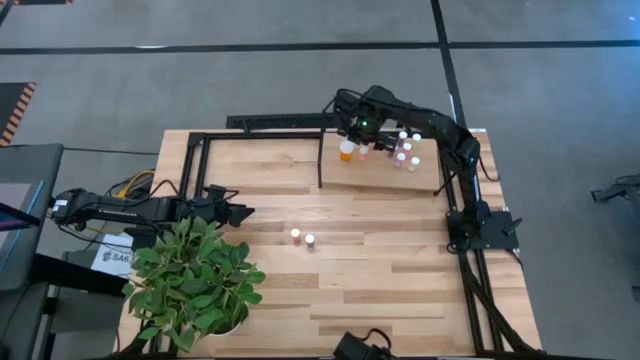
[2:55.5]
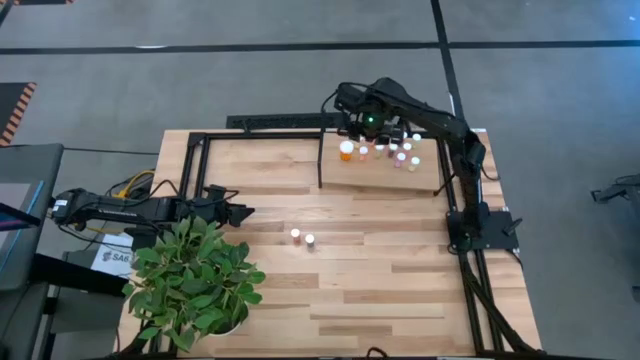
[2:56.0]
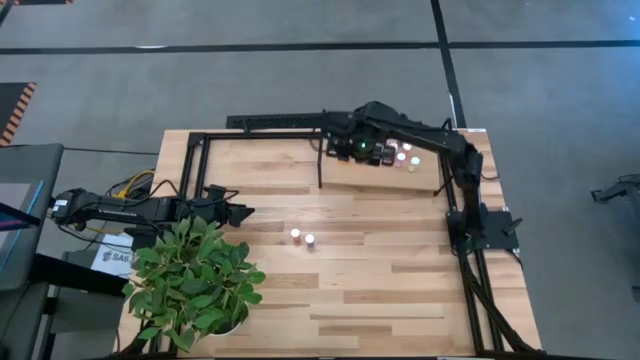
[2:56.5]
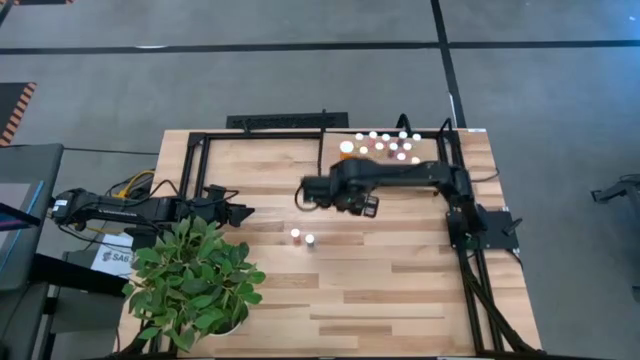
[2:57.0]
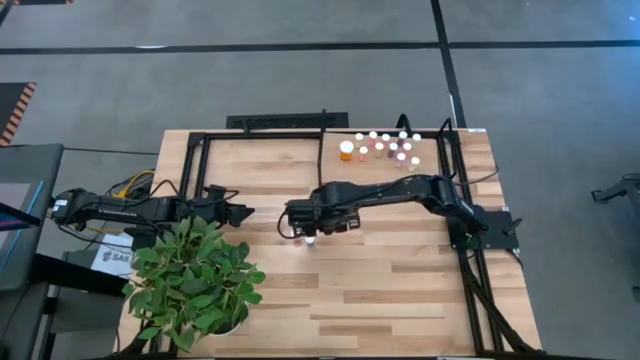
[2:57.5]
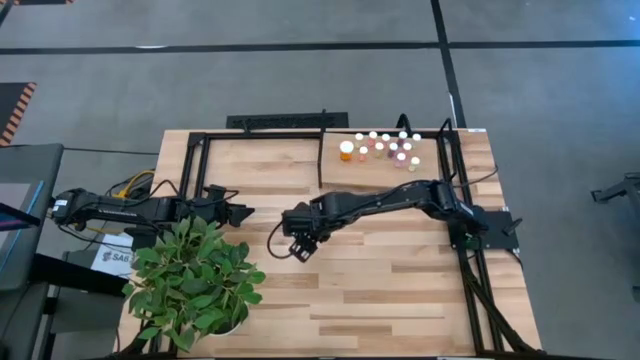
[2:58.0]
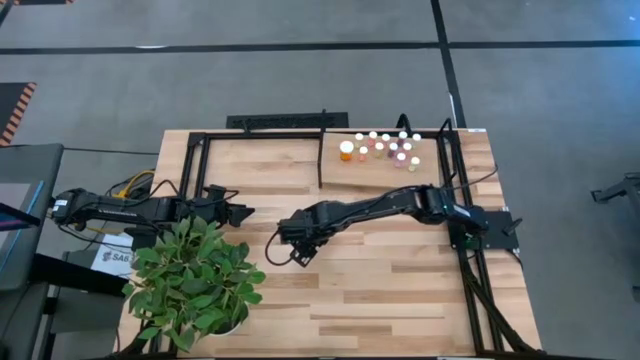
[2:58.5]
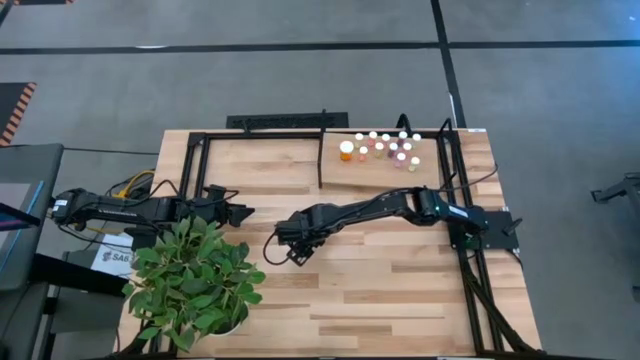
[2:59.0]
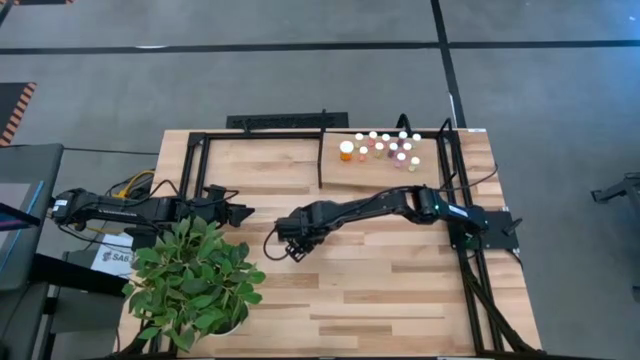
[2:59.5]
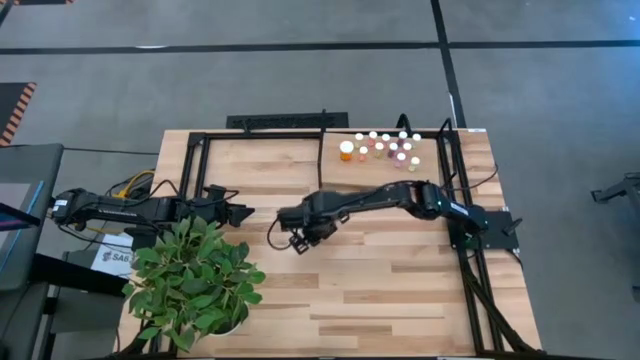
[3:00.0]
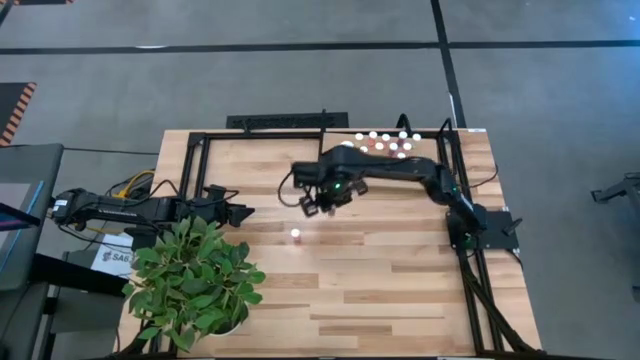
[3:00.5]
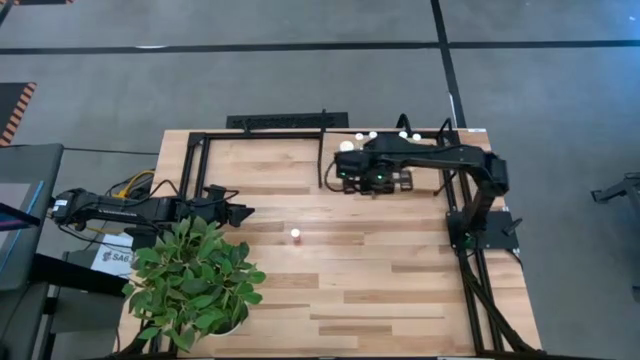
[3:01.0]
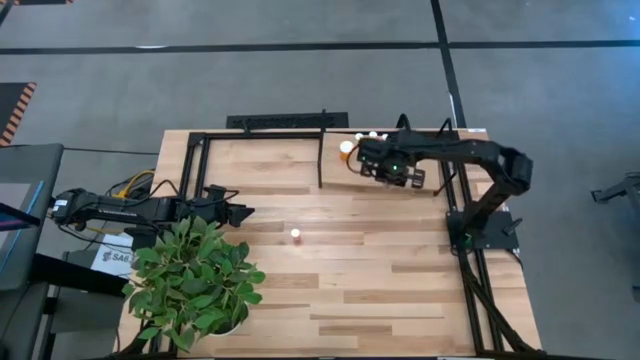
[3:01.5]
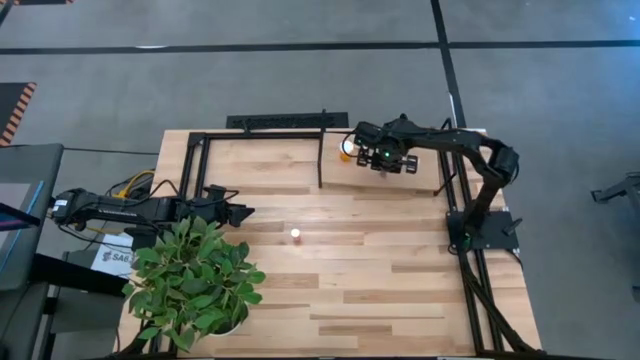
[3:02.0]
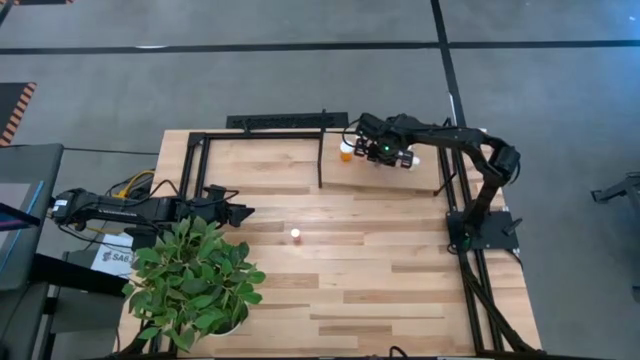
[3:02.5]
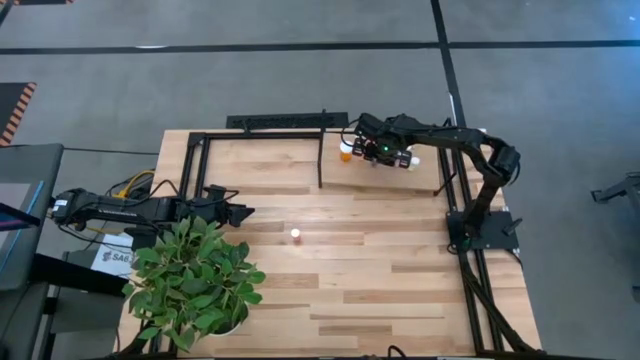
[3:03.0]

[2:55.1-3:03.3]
Task: Pick and place medicine bottles onto shelf by color
Put the blue pill bottle on the shelf

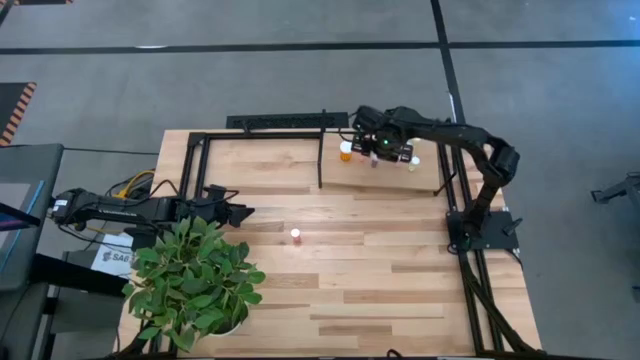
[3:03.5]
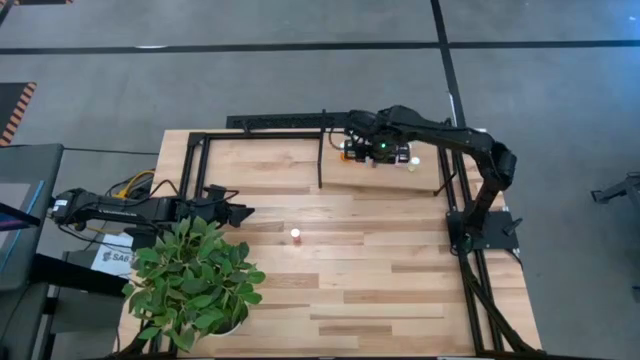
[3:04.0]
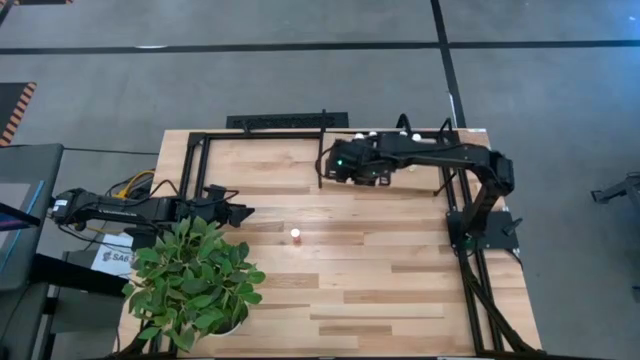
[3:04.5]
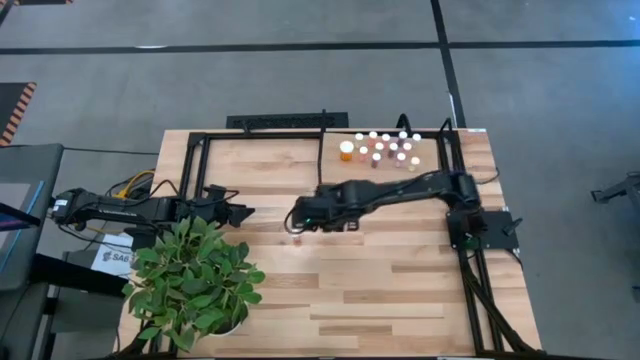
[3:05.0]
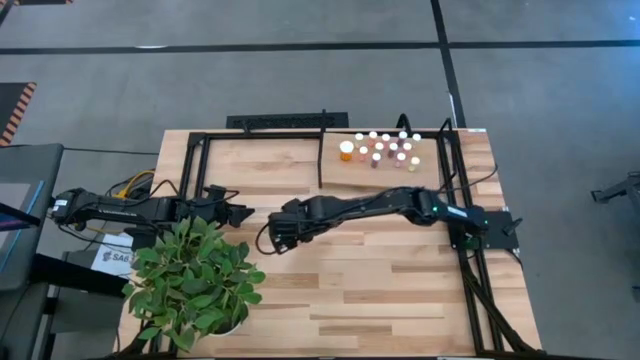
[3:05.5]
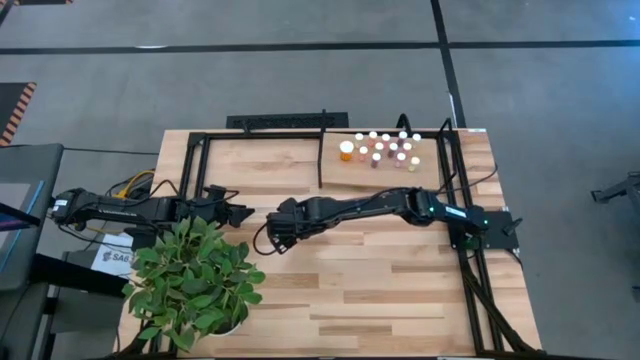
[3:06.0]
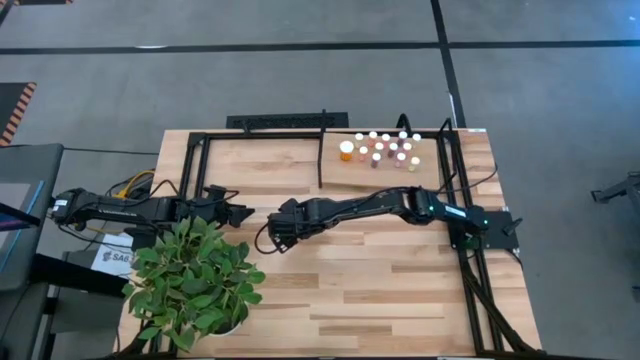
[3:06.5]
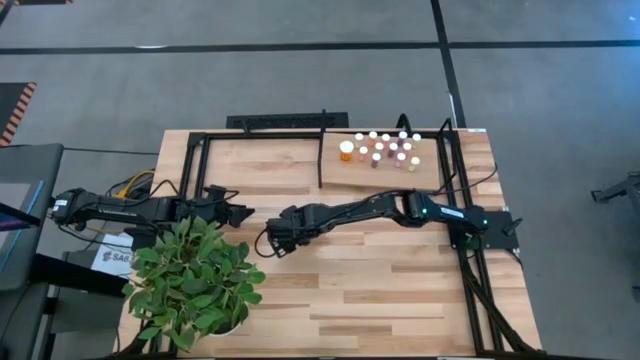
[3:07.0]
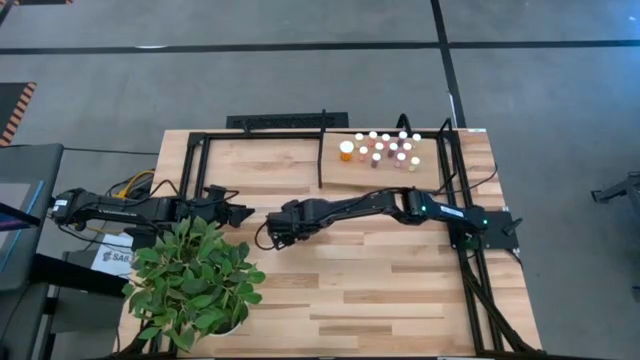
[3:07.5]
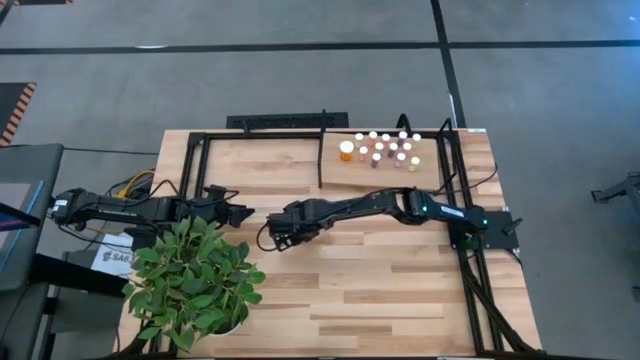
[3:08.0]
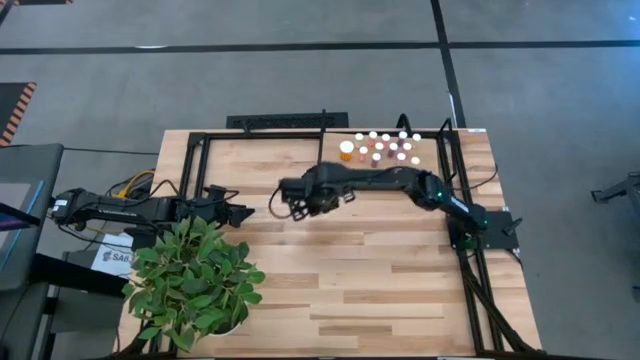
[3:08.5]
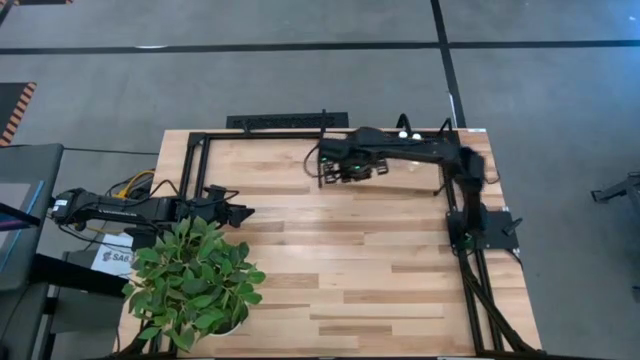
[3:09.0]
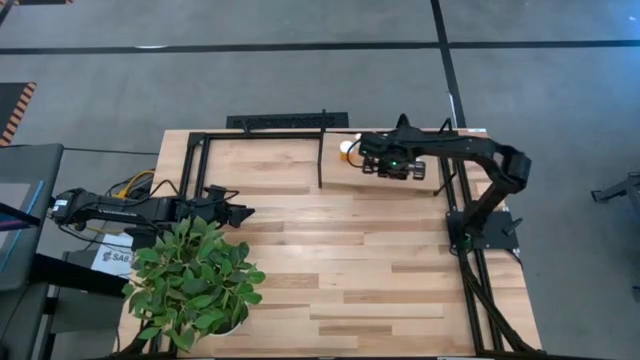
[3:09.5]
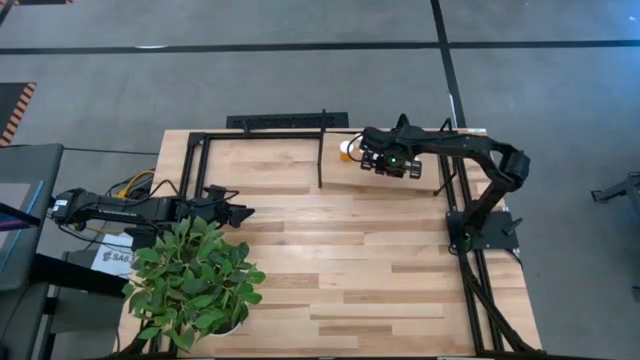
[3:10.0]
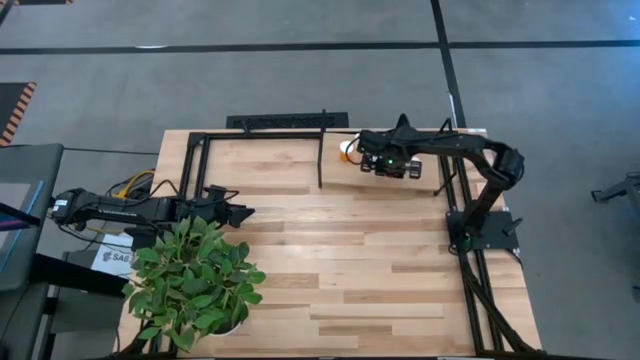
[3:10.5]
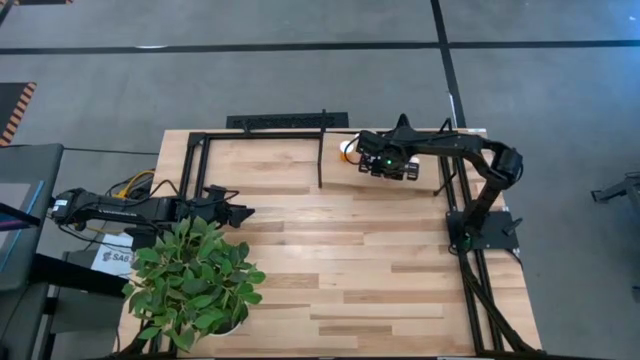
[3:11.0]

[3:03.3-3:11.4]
Put the pink pill bottle on the shelf

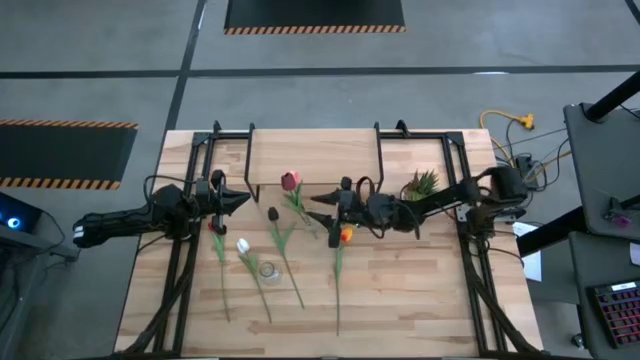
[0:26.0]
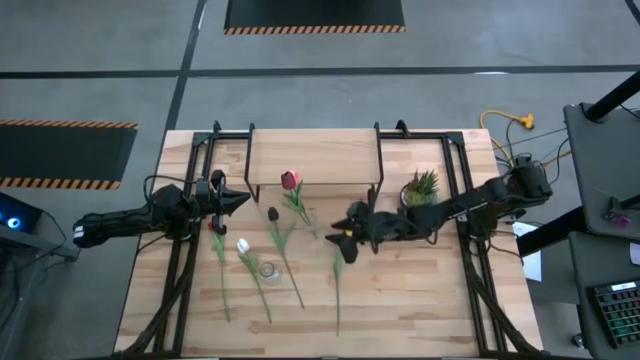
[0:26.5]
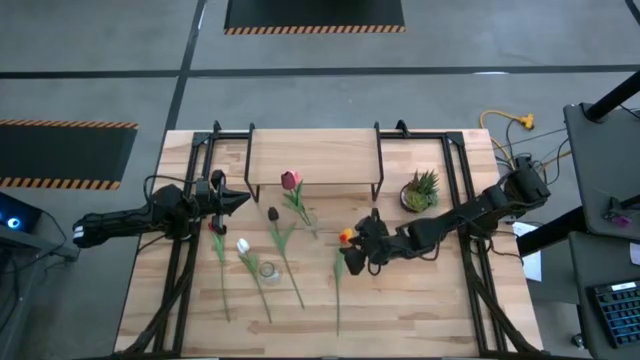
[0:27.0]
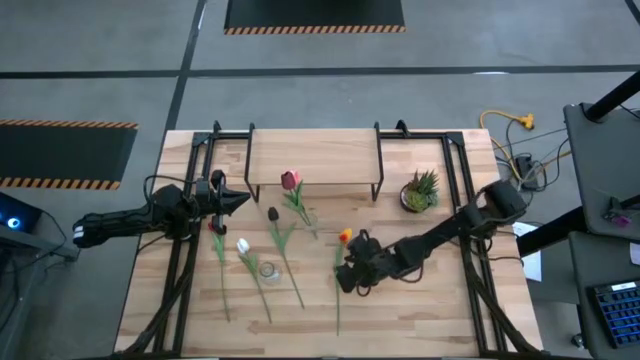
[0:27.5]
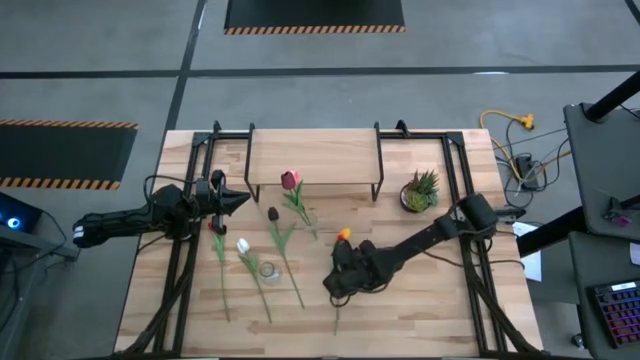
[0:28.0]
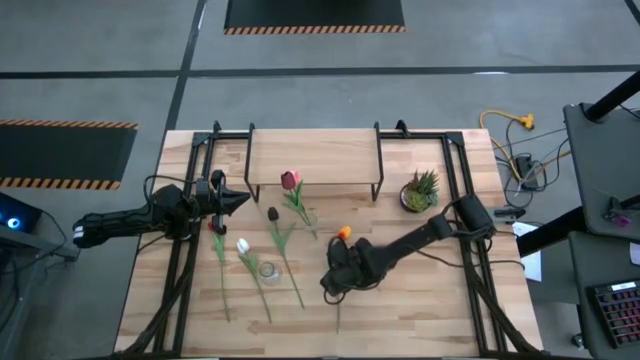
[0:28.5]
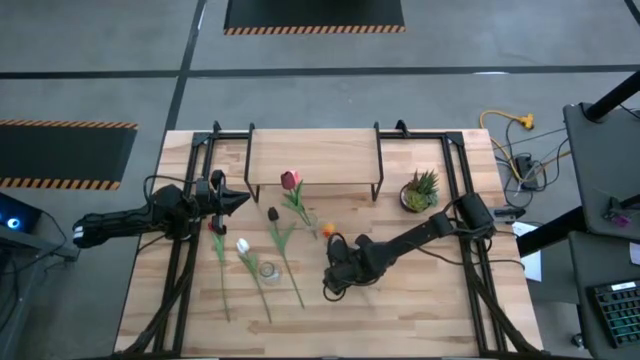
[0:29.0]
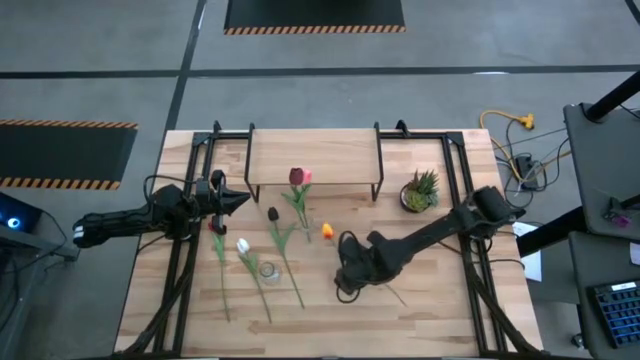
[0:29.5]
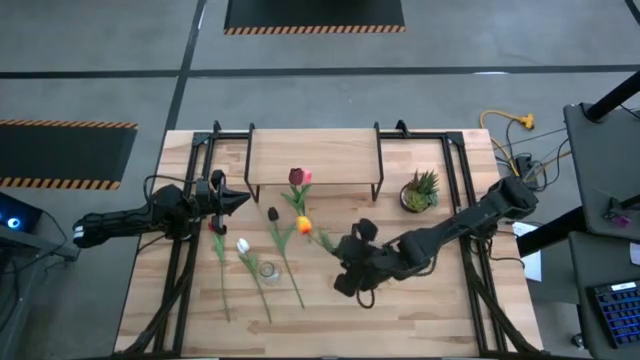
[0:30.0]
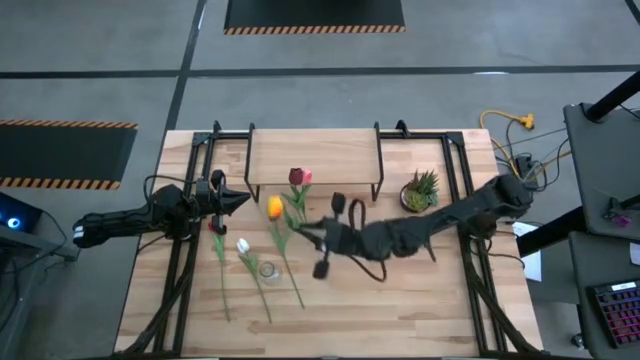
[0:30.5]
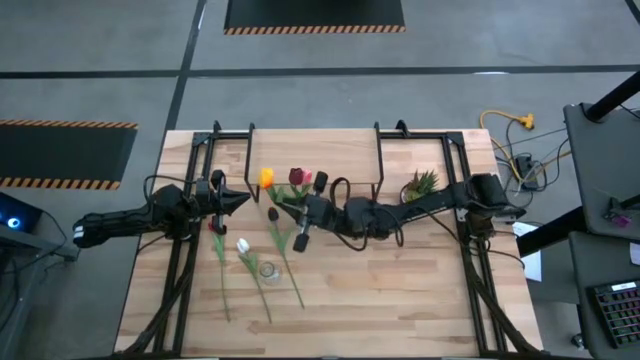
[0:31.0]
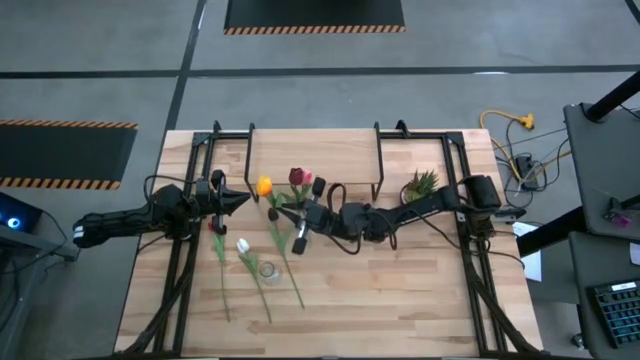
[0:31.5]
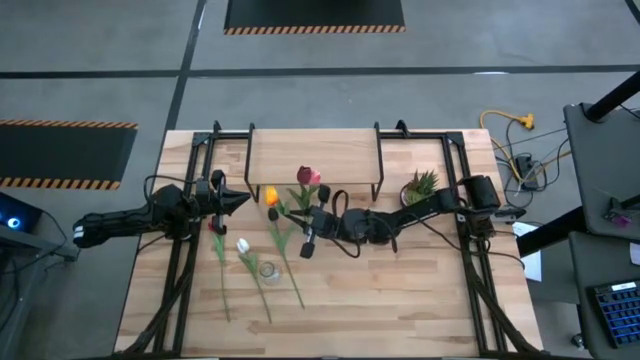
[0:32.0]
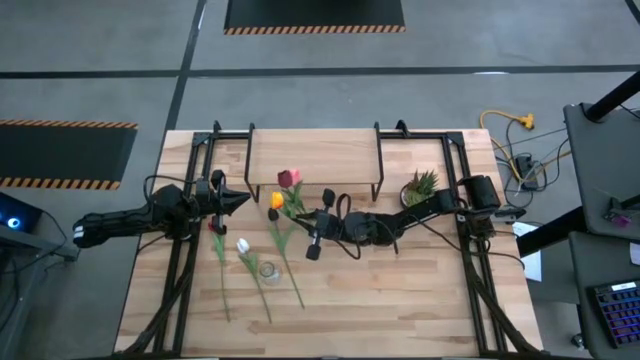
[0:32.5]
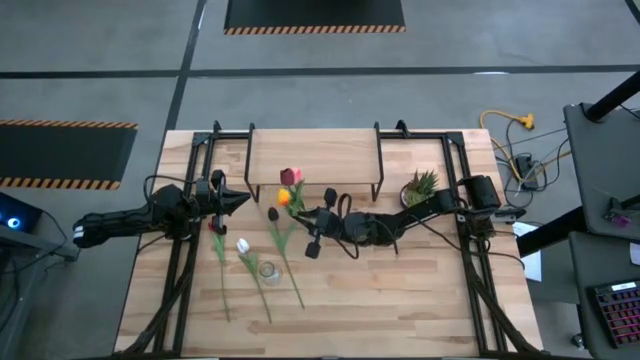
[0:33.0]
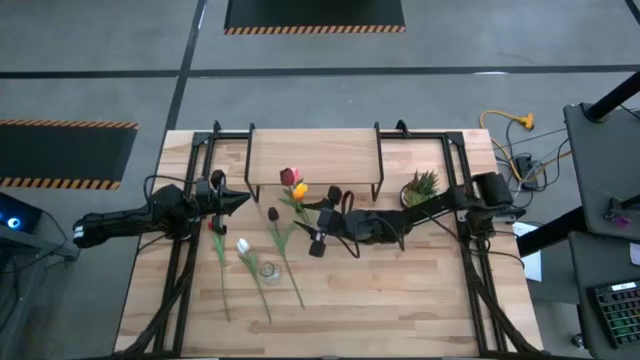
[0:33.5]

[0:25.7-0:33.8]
Task: Pick and place flowers into a vace then onto a shelf
Put the yellow flower into the top transparent vase
